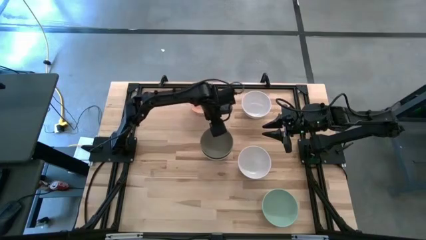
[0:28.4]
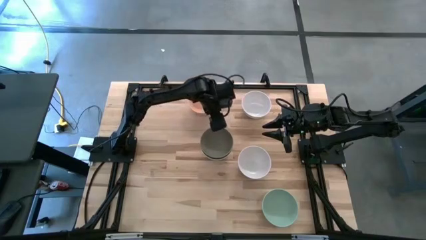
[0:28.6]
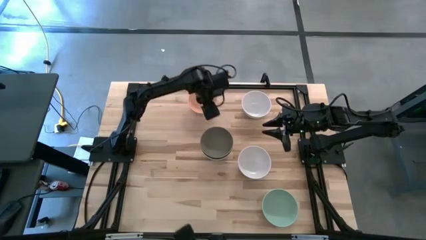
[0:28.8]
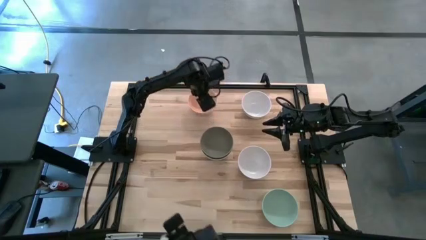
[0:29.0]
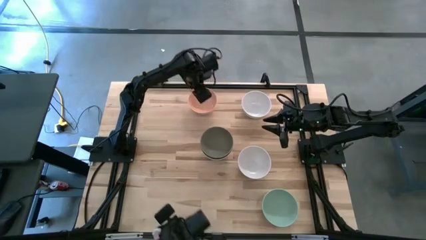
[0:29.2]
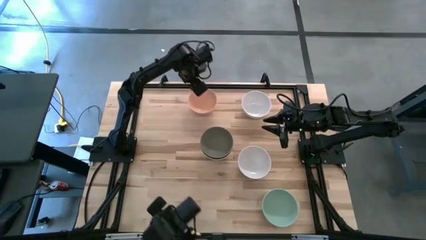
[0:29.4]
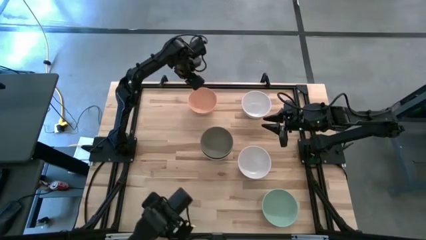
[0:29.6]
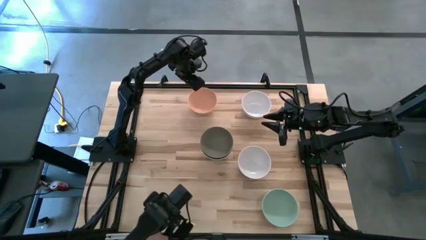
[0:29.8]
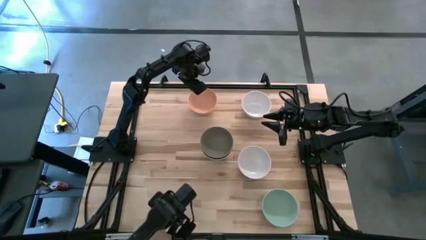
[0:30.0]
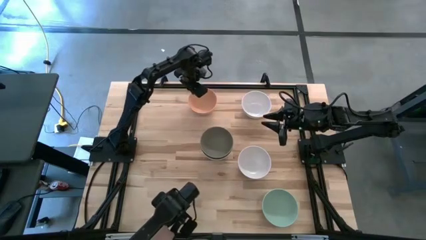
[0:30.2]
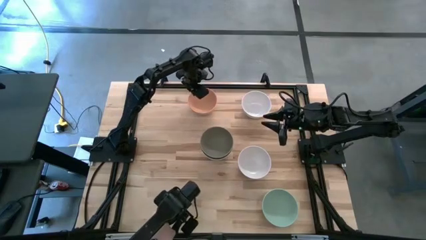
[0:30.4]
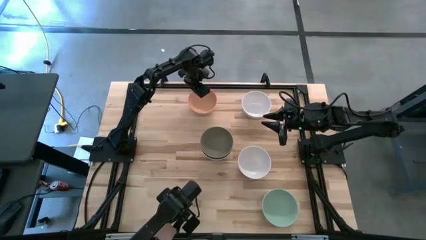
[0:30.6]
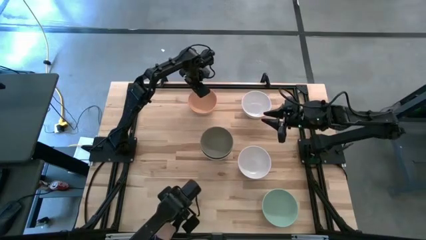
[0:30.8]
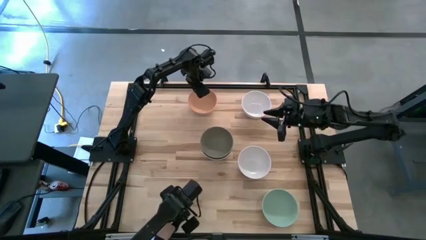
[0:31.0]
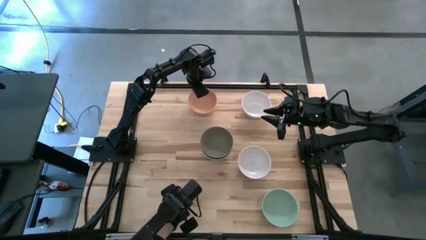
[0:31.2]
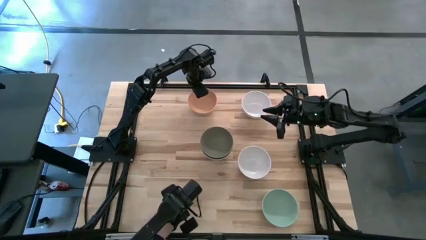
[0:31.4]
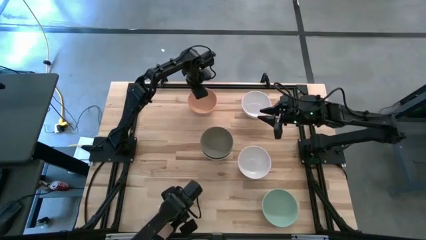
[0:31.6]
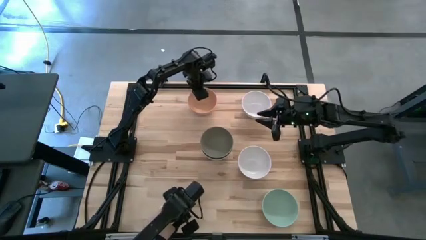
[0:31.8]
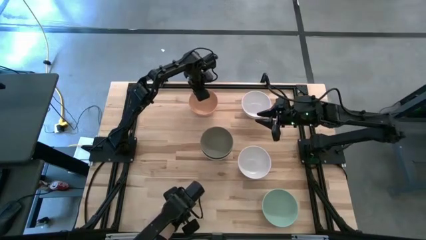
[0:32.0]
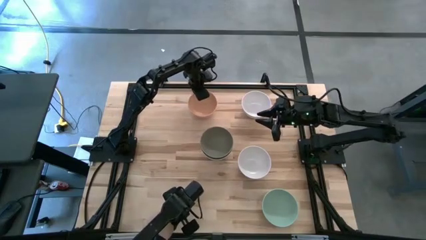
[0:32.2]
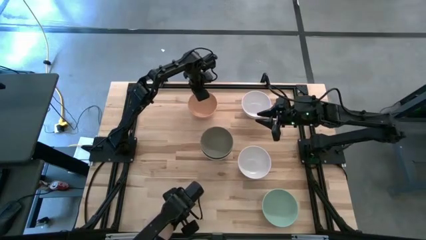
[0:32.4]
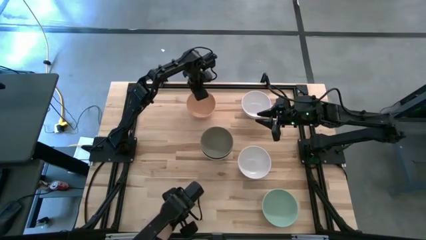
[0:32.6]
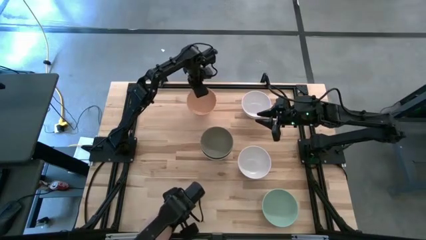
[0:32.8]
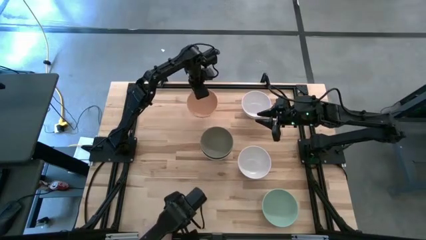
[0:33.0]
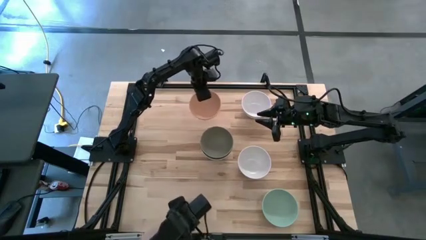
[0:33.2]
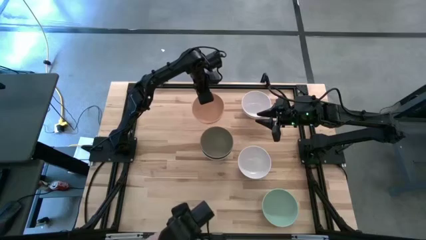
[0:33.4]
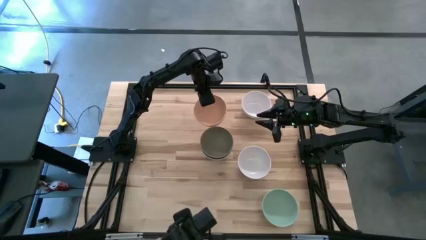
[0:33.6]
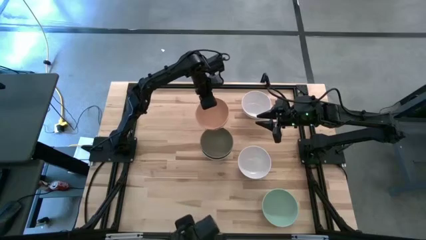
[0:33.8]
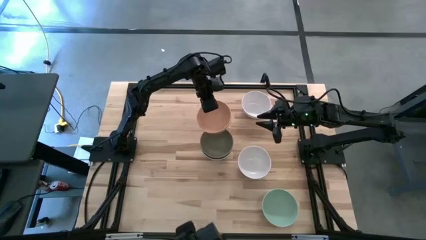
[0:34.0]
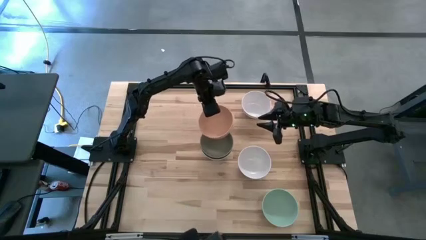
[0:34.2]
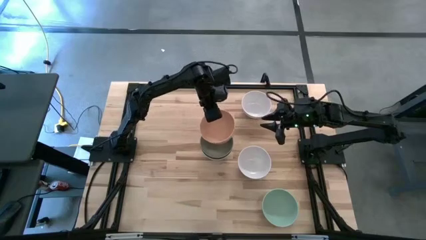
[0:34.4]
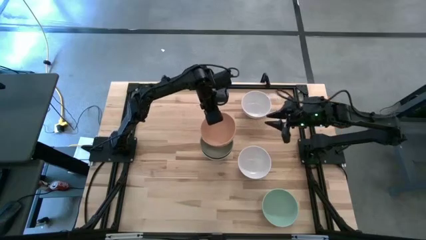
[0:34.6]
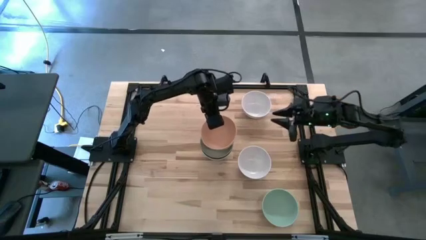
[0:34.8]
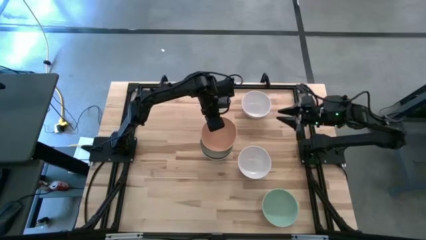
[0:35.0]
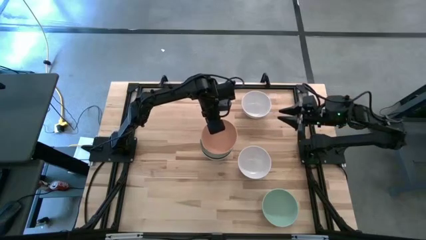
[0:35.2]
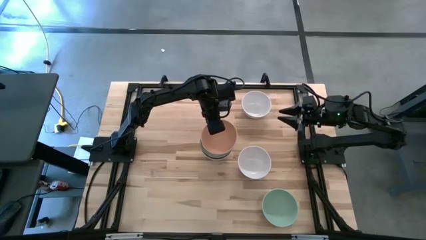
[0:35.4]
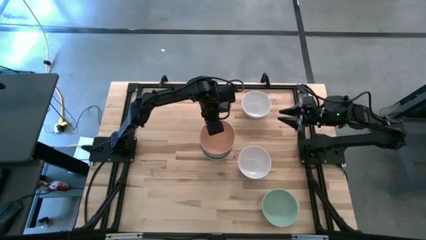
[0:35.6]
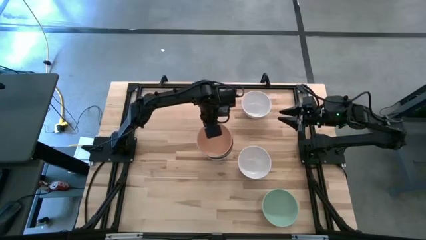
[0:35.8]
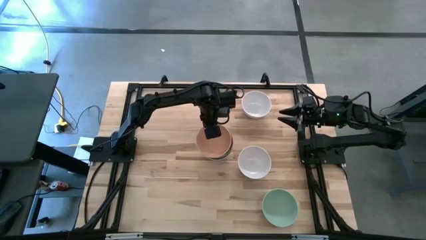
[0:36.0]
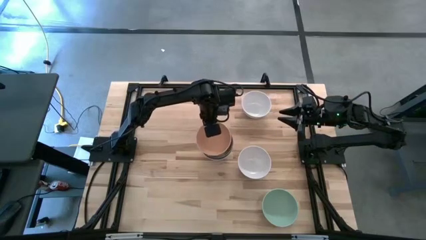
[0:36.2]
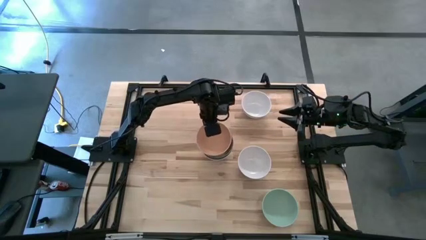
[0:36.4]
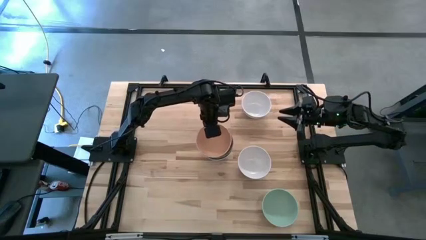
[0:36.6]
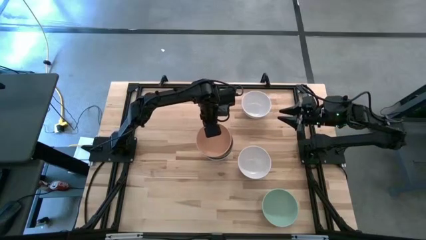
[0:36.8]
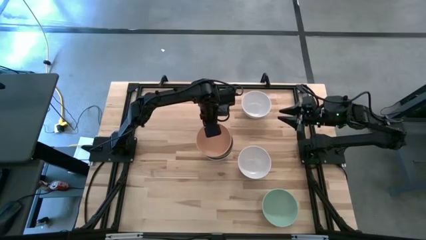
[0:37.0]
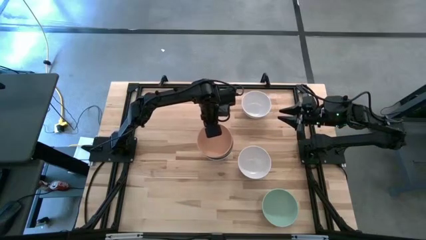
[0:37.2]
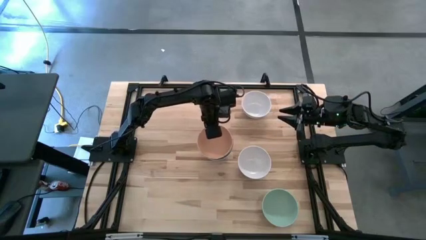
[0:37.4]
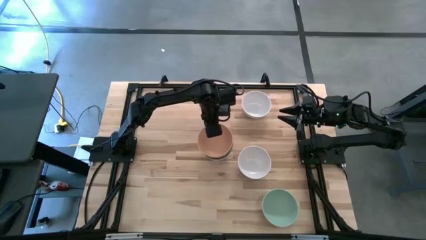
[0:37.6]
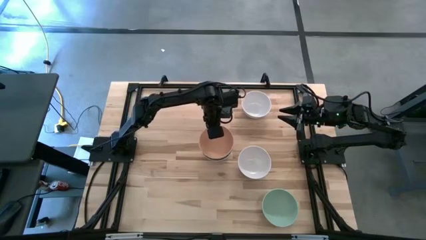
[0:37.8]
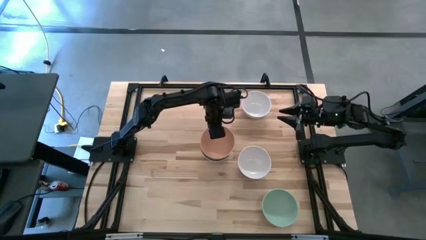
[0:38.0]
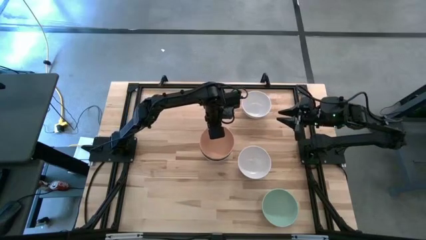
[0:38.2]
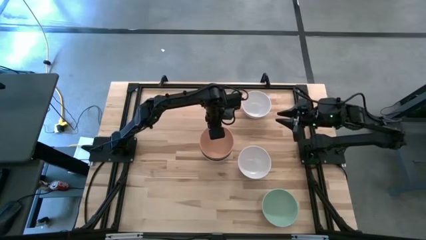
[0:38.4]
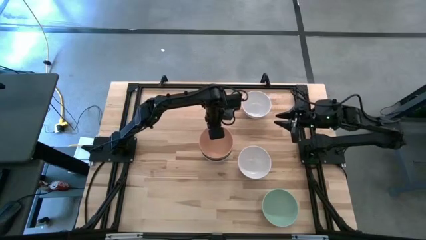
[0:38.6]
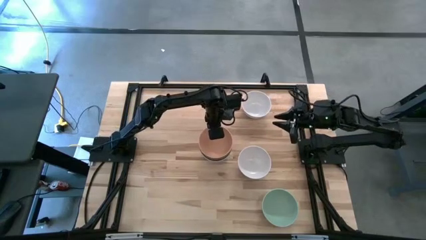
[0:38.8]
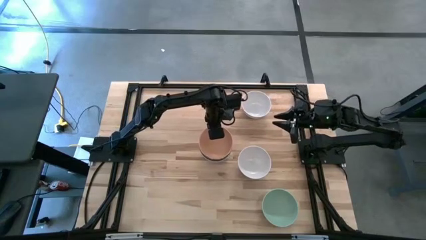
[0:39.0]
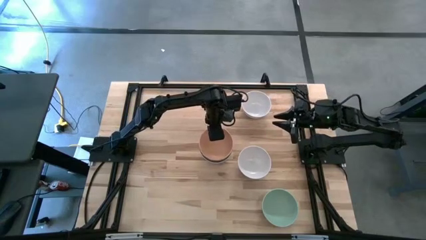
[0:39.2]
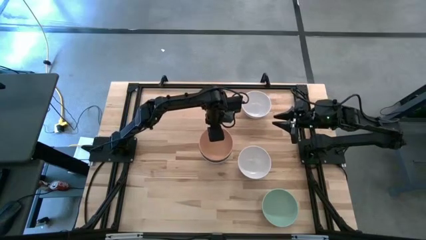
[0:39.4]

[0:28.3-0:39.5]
Task: Nest bowls inside each other
Stack the light orange bowl on the gray bowl

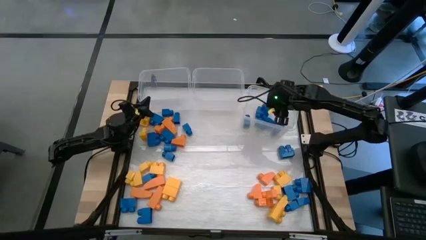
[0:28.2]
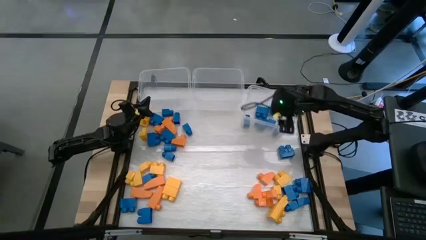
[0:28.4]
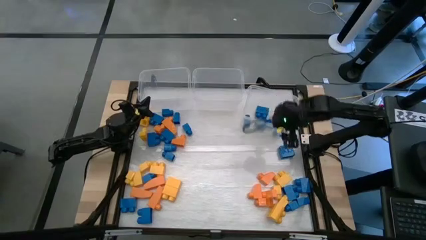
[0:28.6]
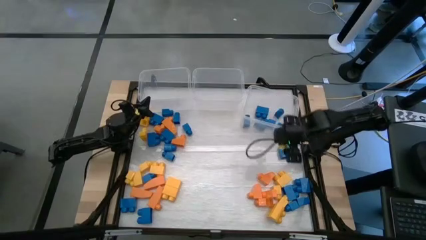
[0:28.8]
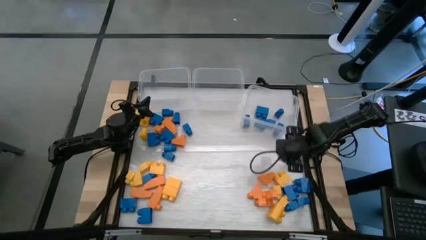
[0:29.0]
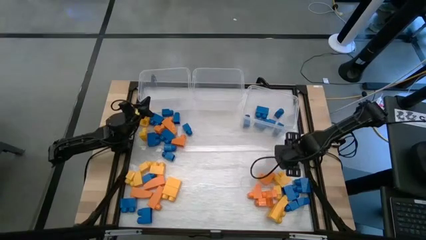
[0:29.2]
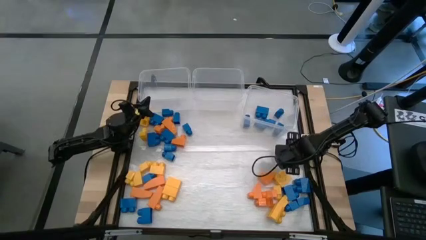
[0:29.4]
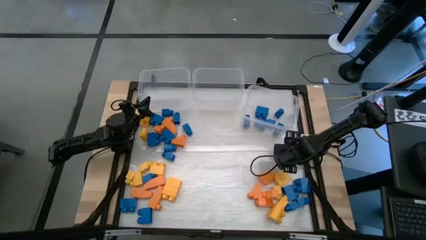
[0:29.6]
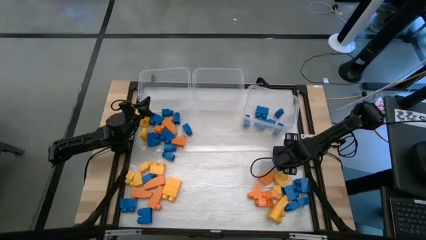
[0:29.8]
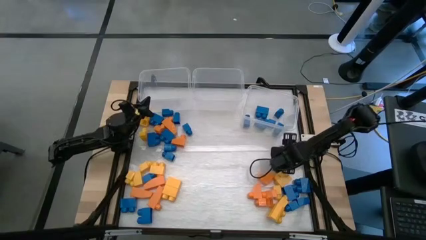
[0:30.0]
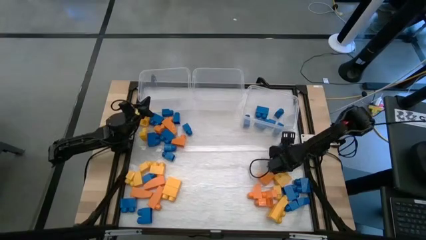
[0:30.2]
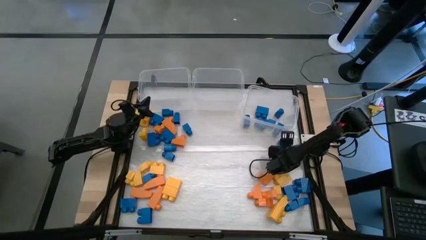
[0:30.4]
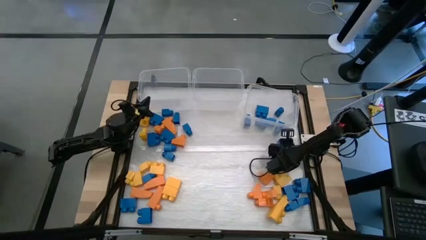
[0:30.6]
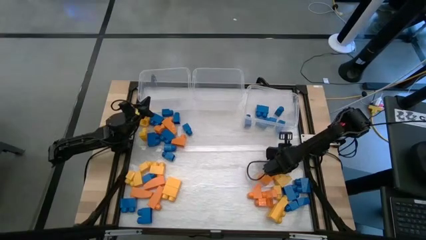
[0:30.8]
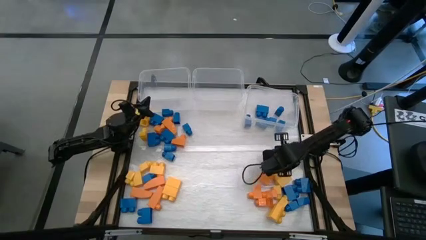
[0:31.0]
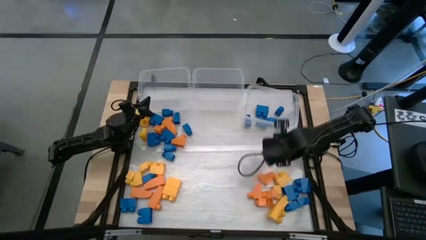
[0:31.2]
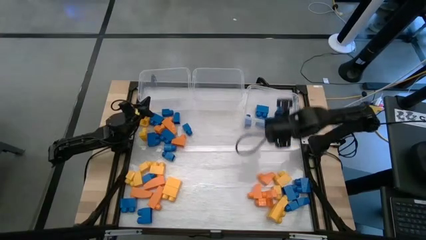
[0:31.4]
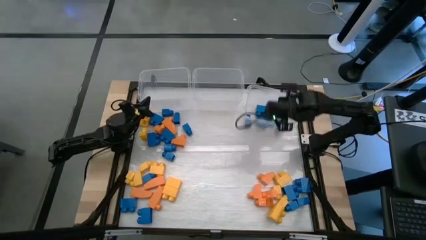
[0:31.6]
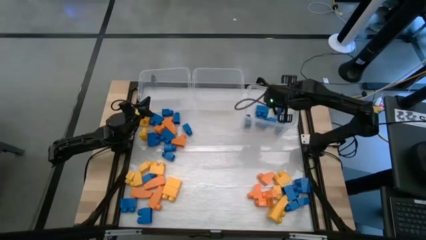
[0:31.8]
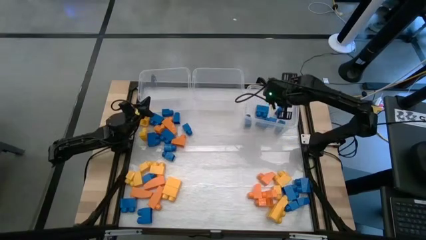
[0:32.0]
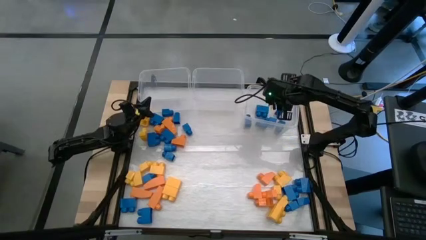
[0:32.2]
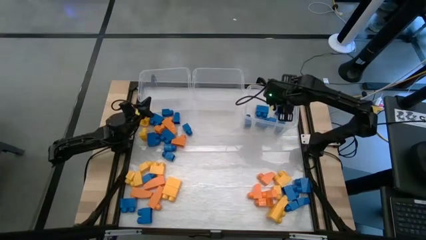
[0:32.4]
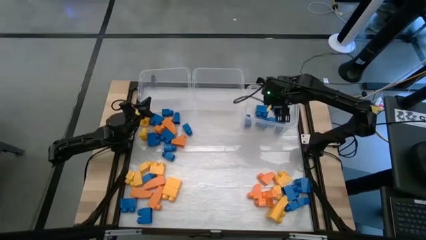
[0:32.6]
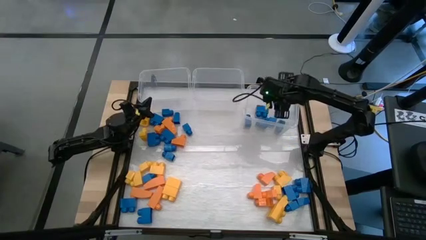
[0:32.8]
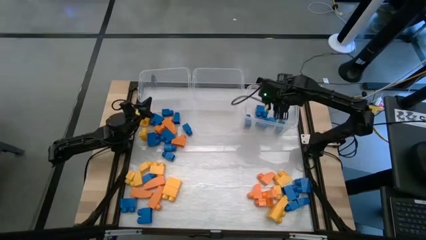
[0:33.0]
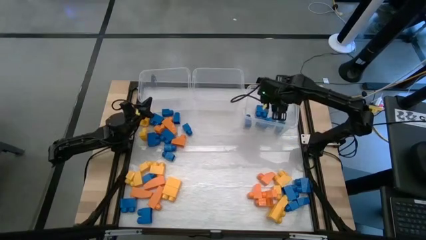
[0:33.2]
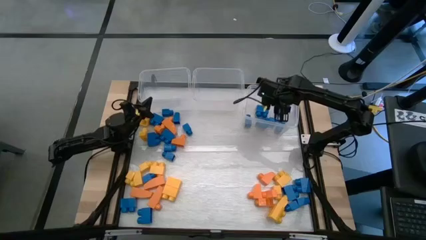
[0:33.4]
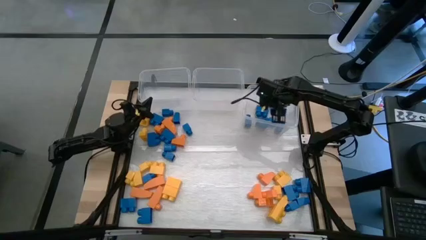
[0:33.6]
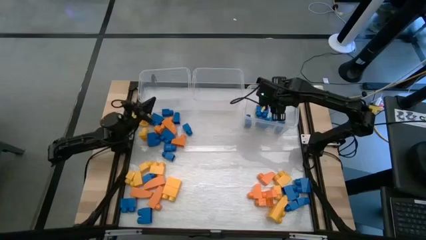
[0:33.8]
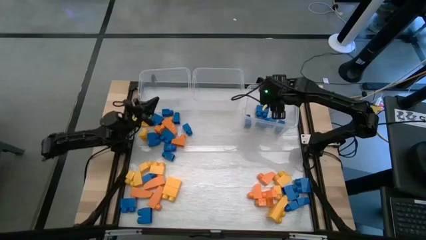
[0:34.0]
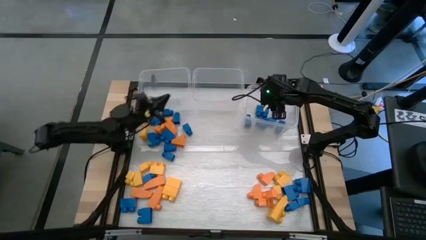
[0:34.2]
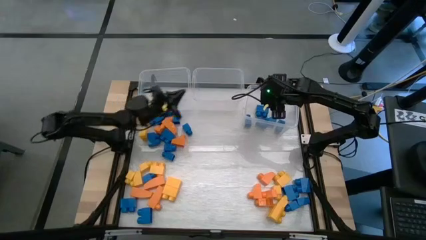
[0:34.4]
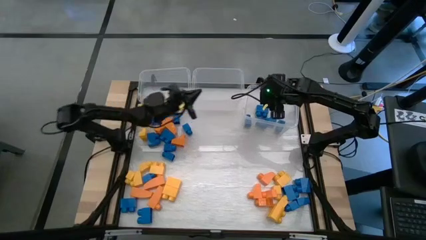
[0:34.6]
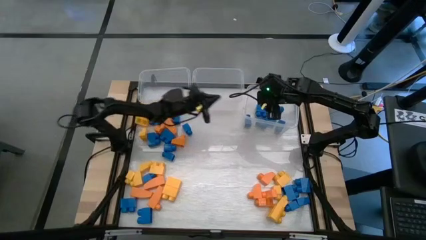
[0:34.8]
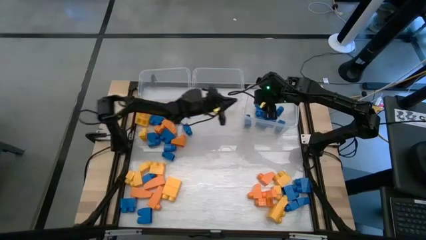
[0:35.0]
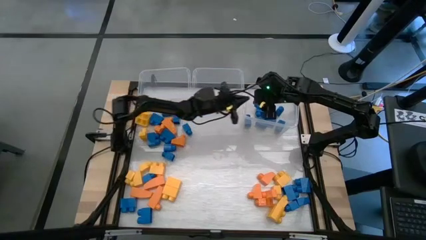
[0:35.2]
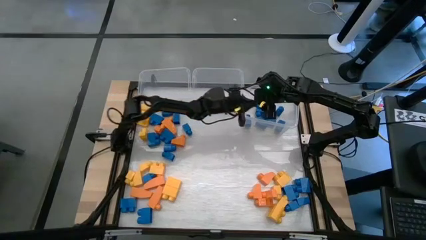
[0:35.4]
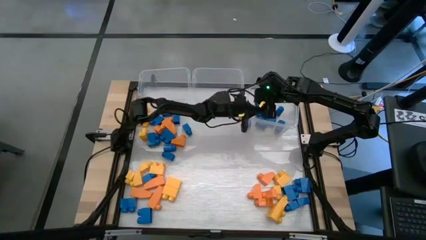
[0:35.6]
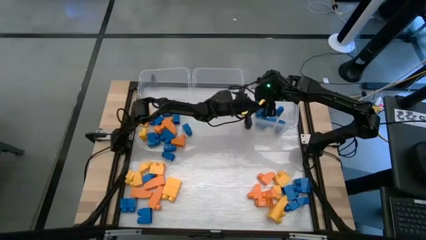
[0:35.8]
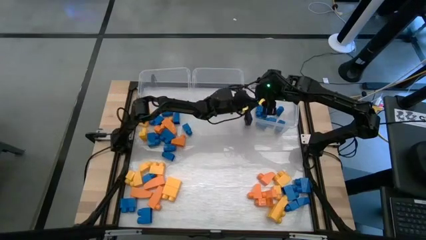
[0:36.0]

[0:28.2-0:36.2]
Task: Sort blocks
Put the blue game piece into the right transparent bin
